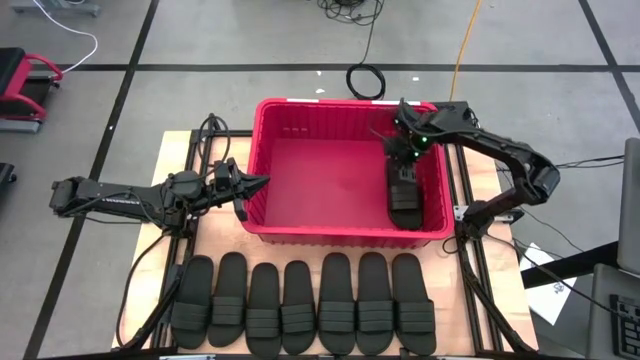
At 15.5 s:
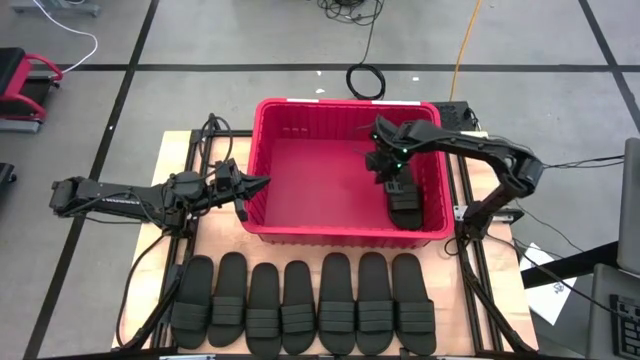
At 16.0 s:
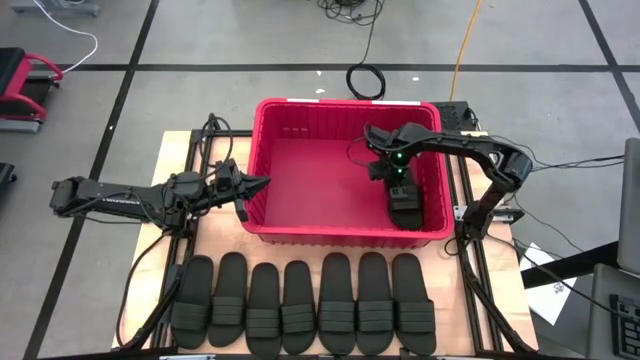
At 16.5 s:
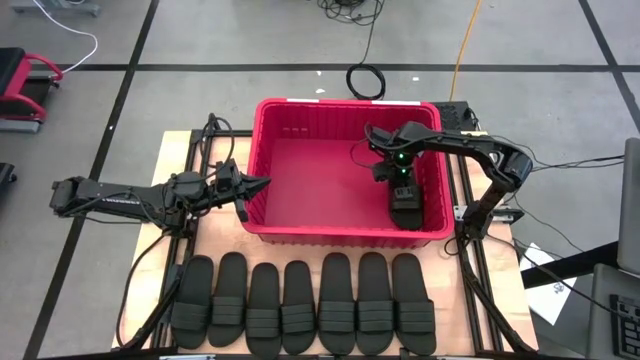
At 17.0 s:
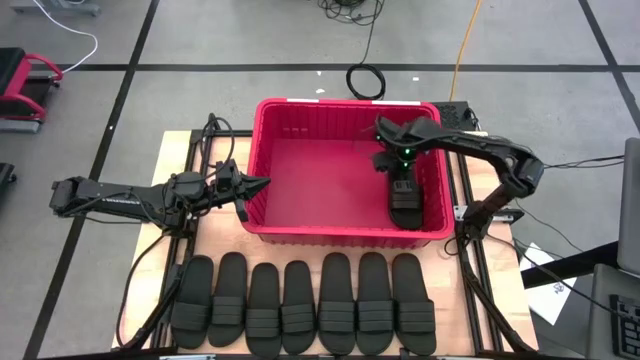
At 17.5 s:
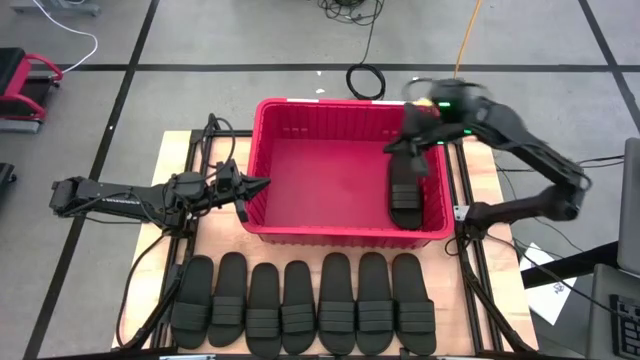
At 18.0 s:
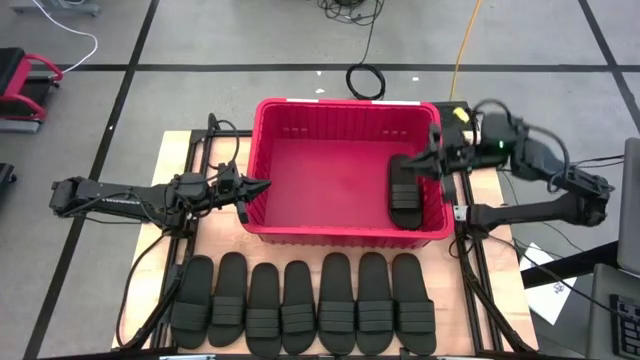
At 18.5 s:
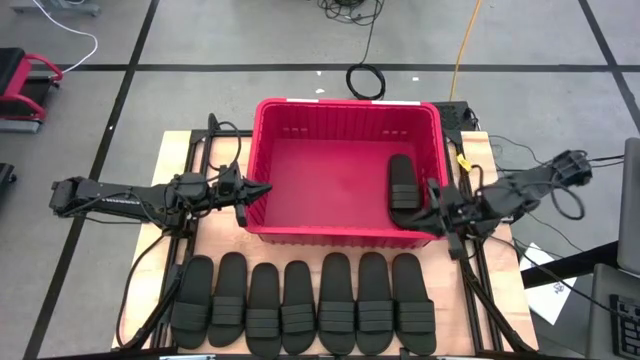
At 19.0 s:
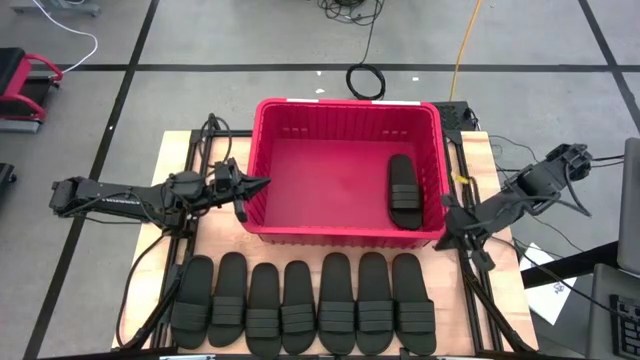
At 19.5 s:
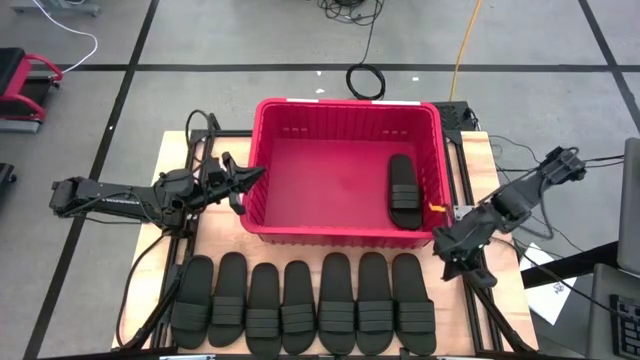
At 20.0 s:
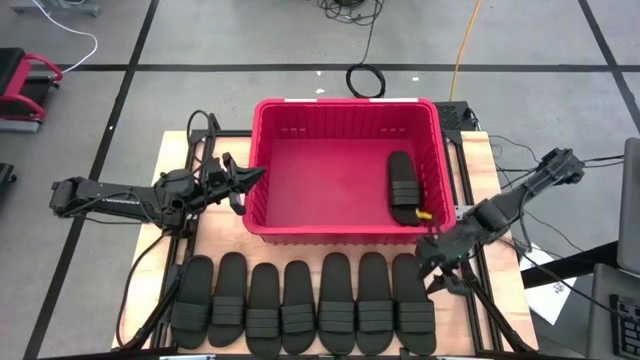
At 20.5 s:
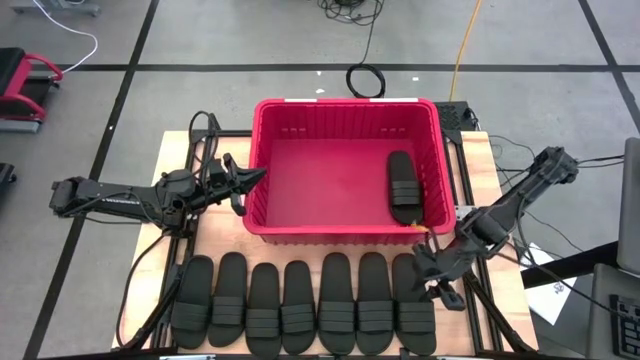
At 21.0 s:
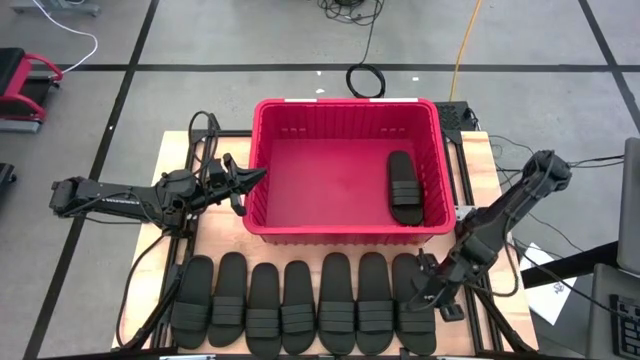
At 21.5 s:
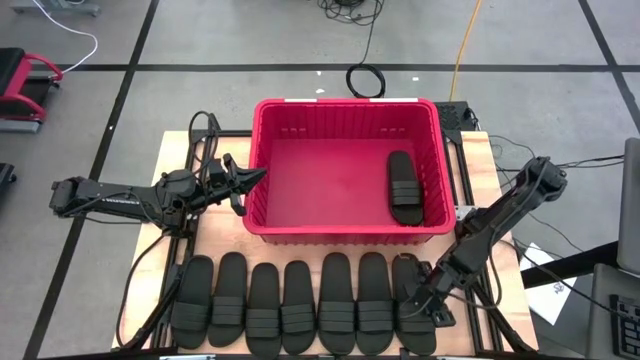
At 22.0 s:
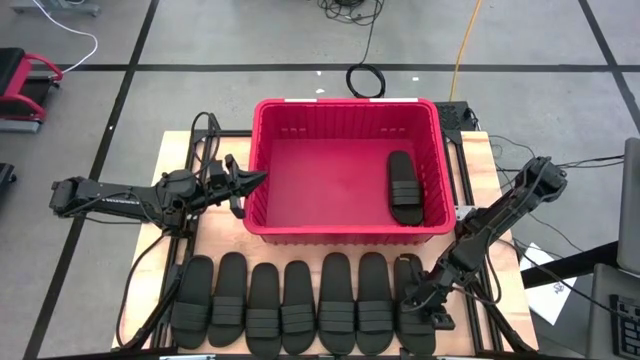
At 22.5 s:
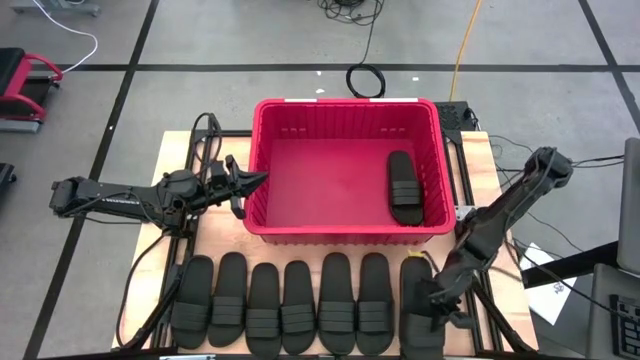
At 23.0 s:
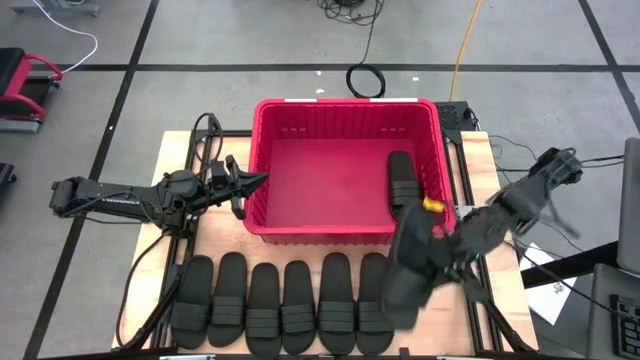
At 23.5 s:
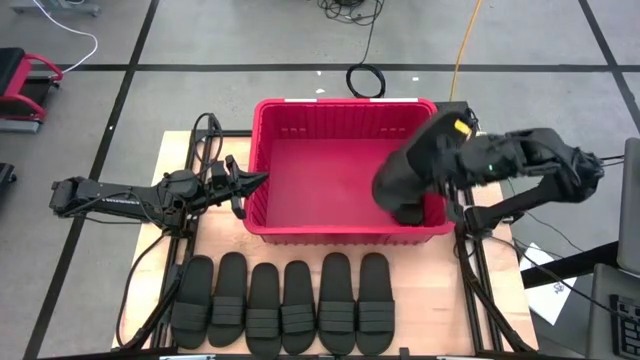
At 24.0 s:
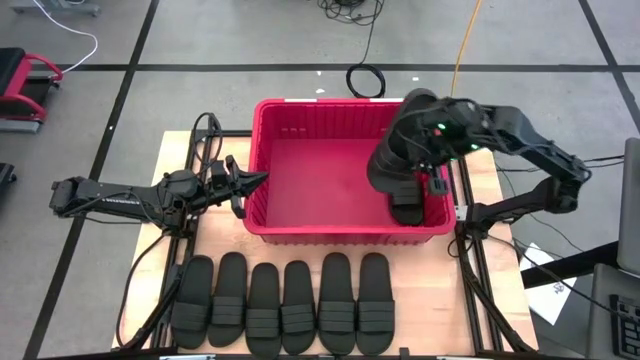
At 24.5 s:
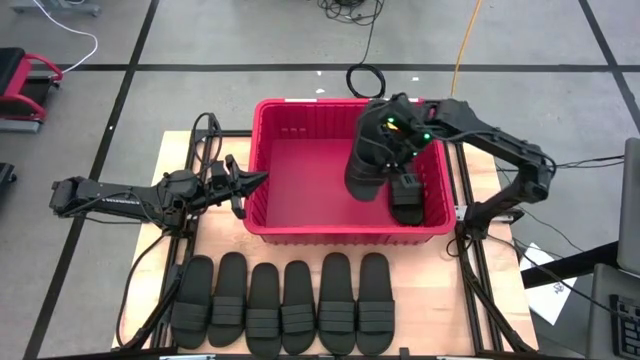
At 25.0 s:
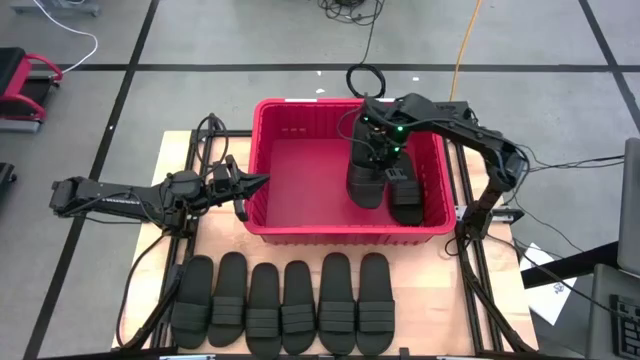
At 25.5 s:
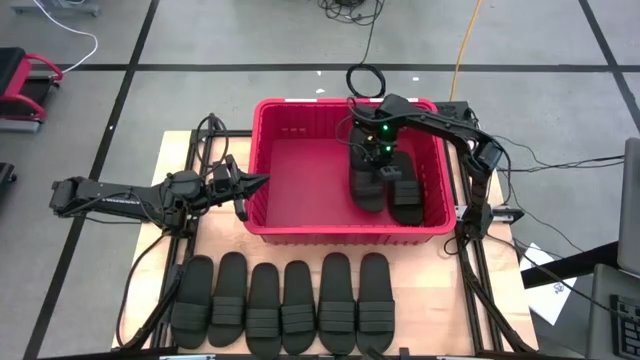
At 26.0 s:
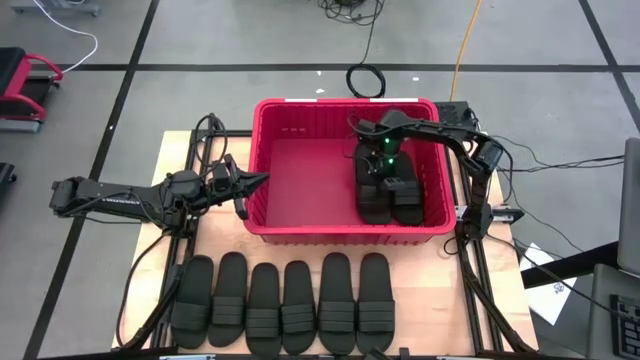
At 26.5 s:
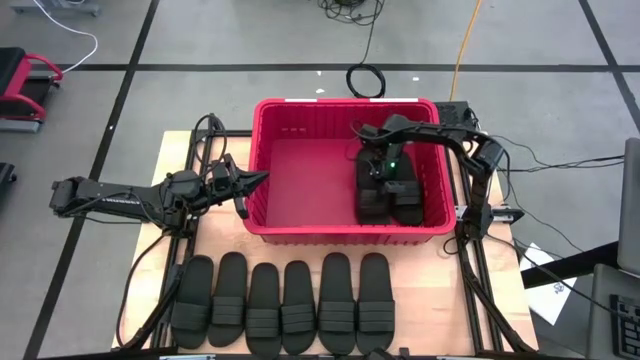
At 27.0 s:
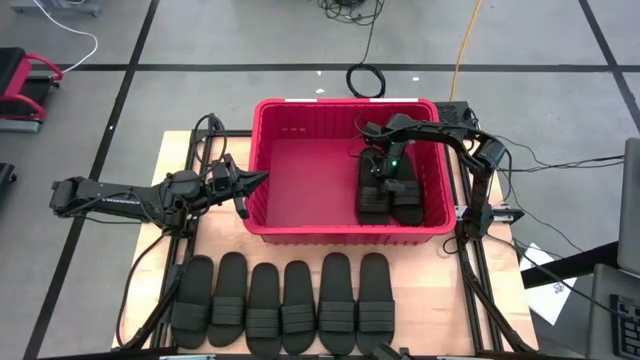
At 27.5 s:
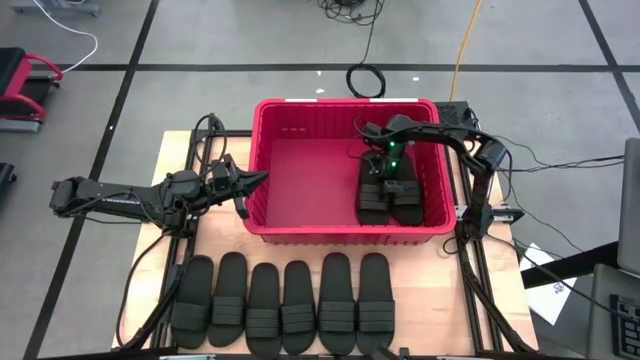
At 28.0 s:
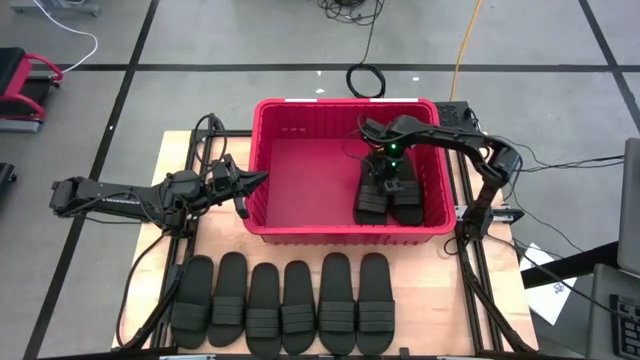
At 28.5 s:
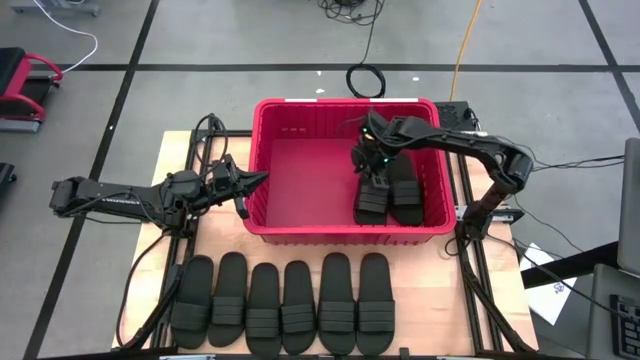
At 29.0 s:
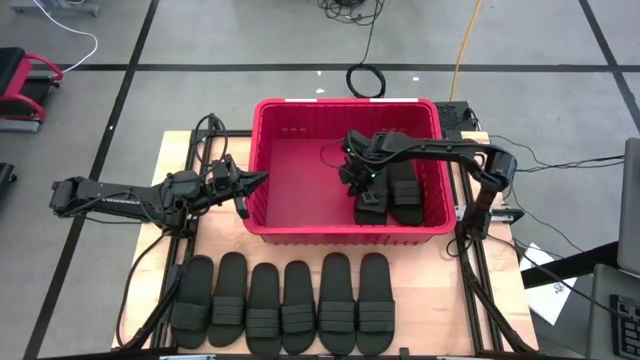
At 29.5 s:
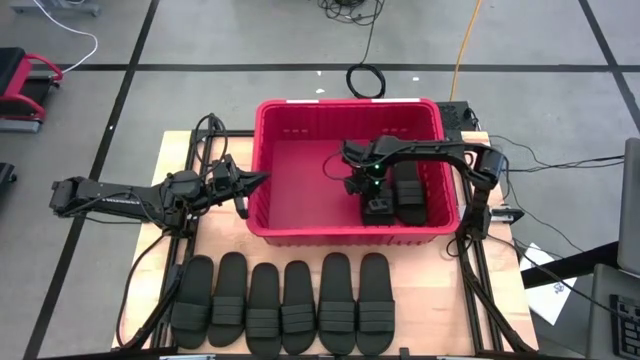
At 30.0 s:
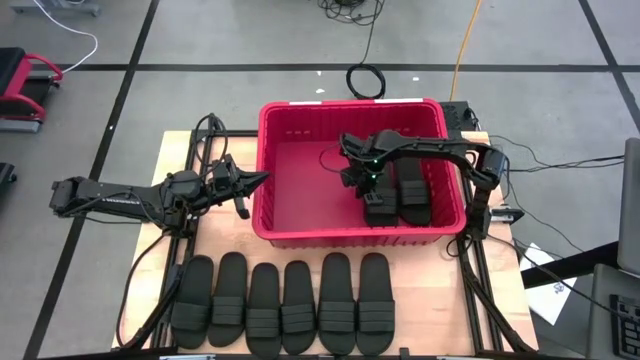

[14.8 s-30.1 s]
Task: Pick and place slides into bin
Put the black slide into the red bin
